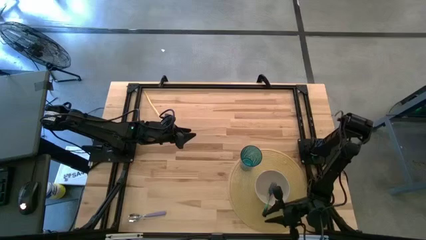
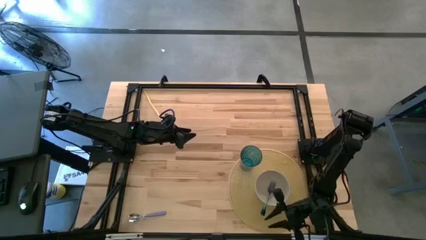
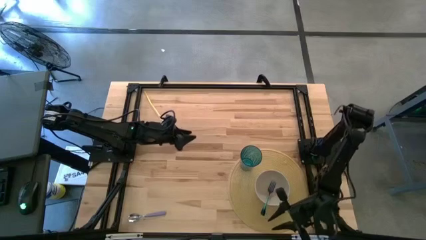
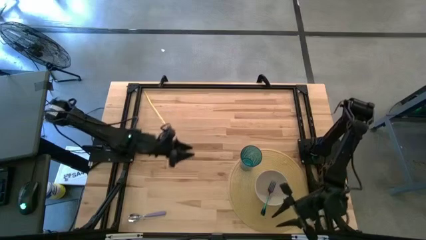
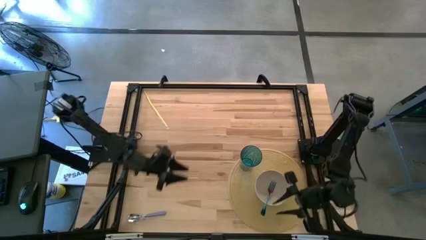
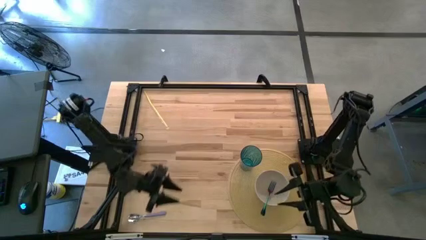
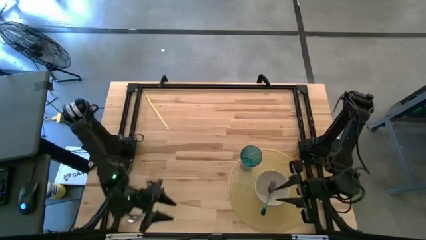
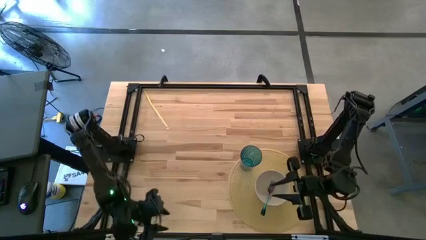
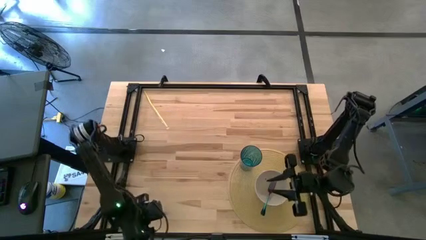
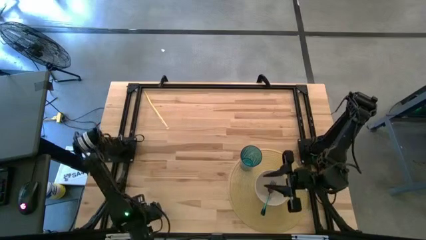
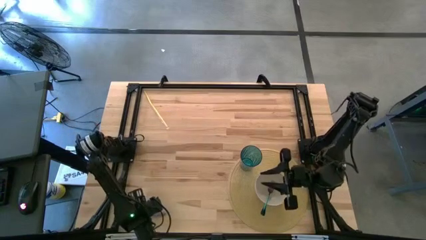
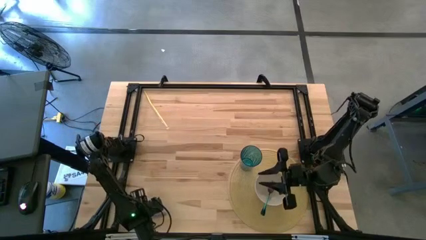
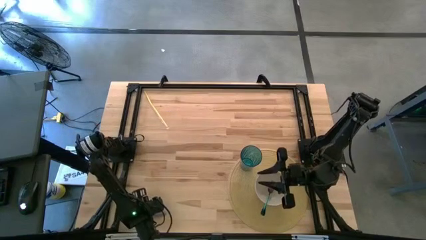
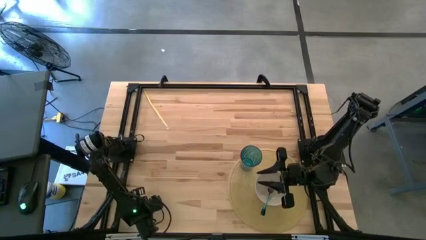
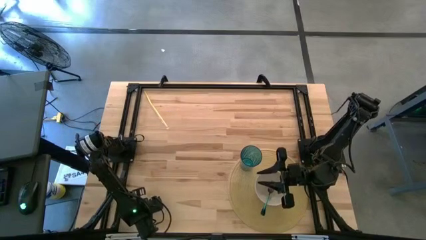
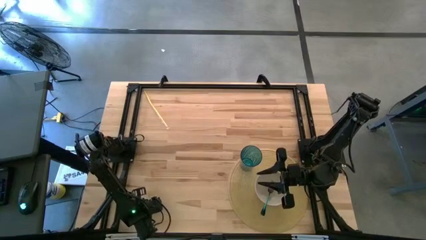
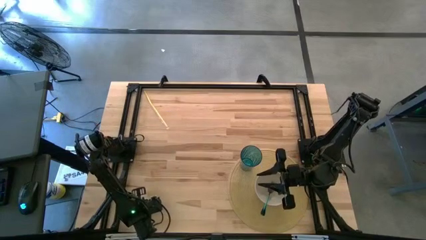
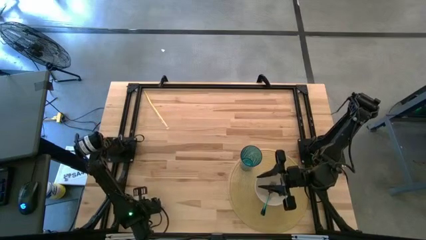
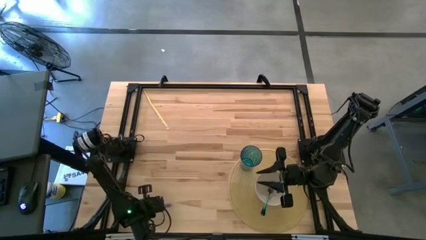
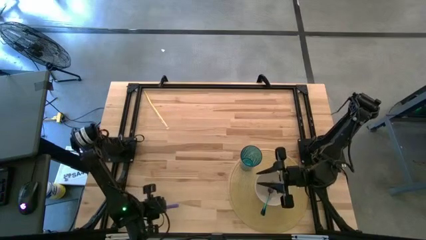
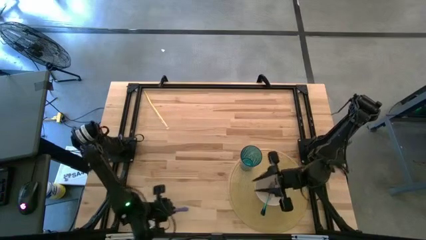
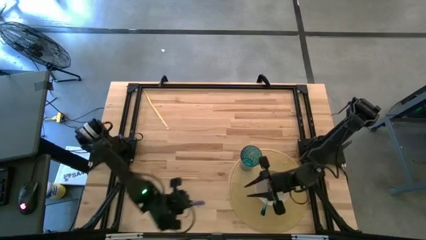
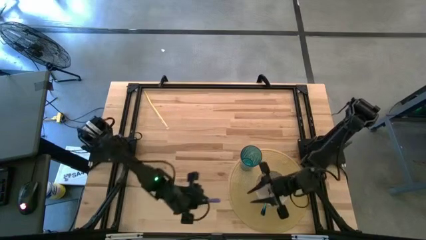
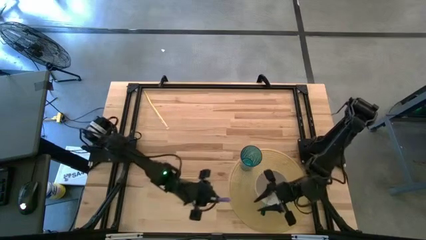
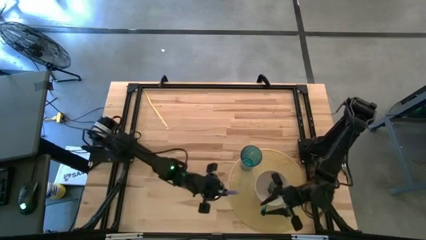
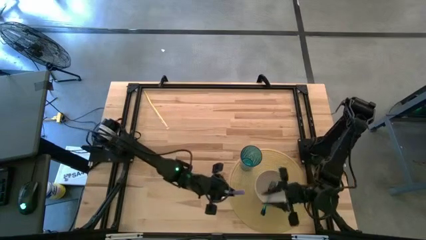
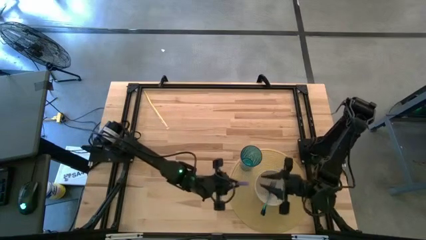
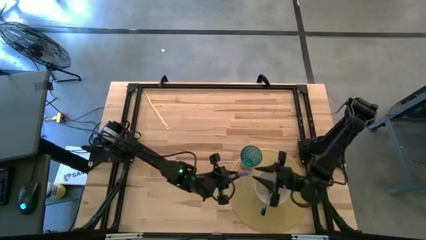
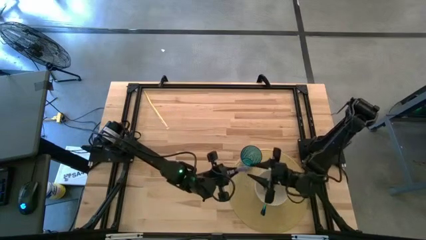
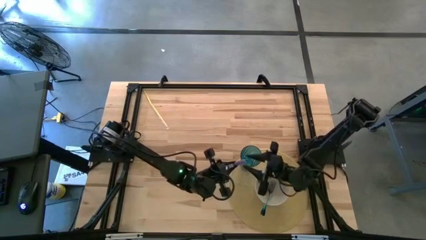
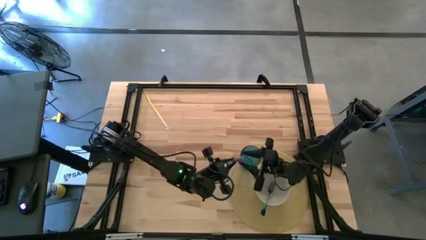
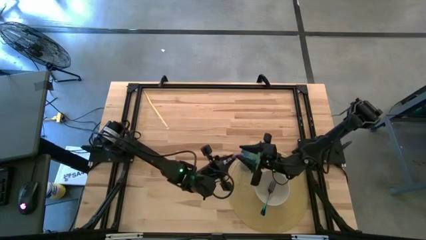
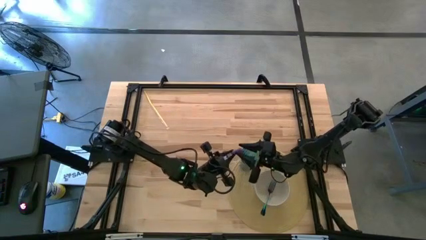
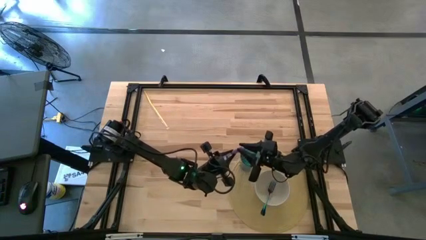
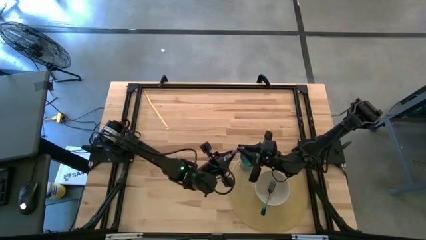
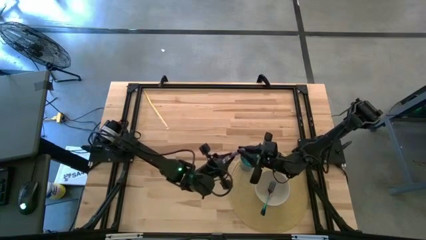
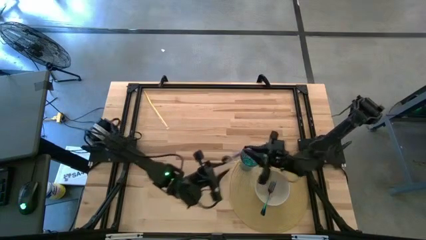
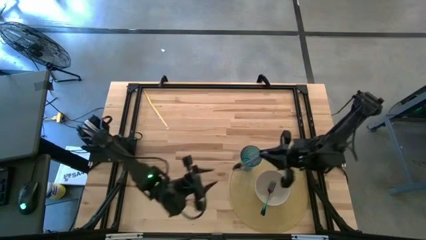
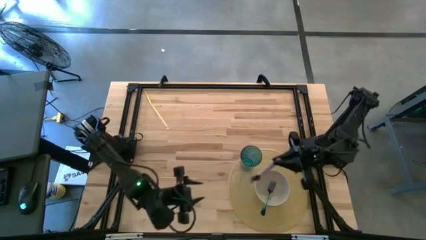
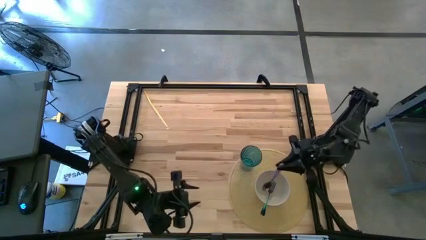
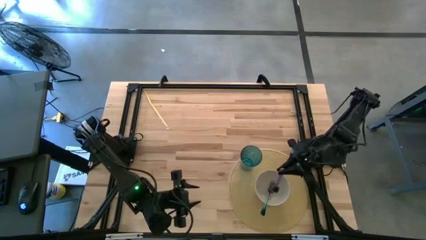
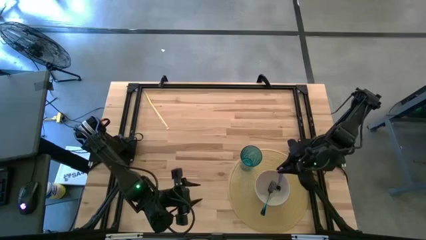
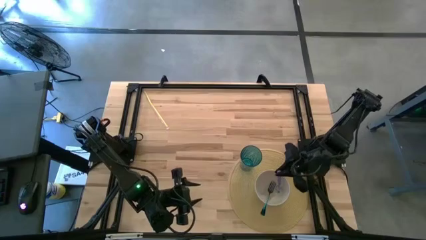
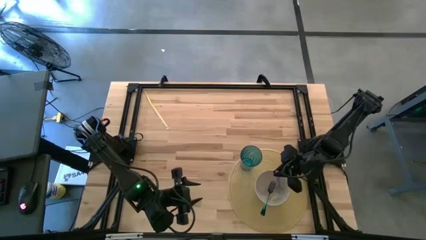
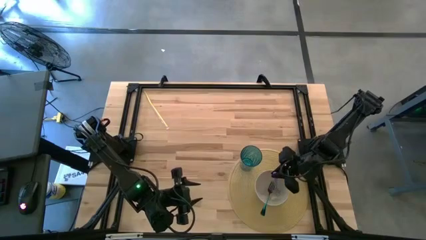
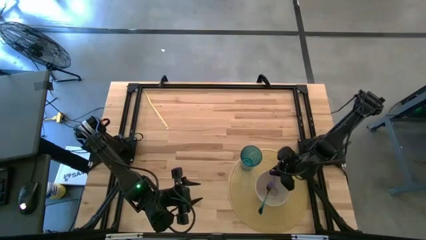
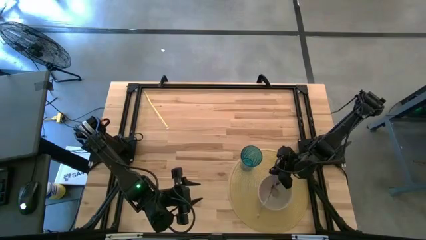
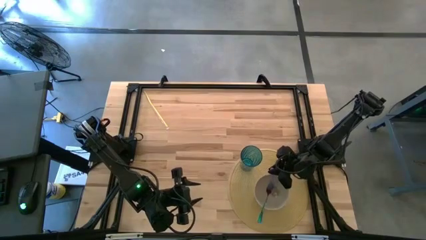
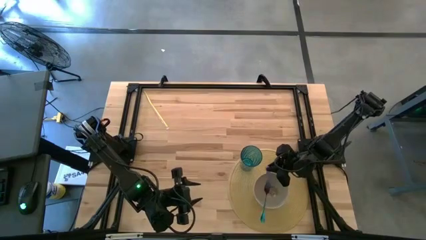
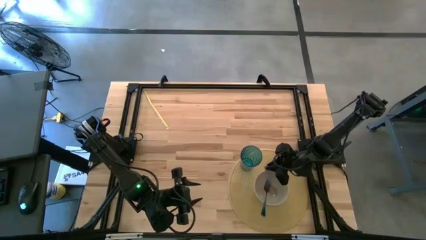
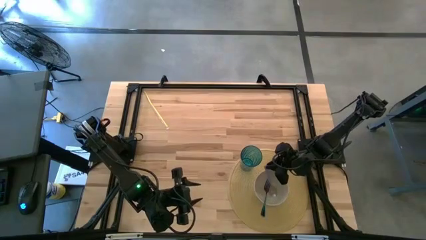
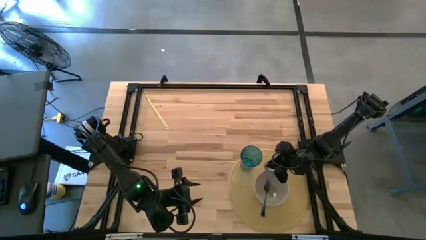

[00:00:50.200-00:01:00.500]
Task: Pick & Place Utensil
Put the purple spoon into the white bowl on the brown mat

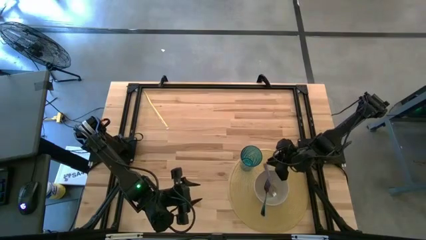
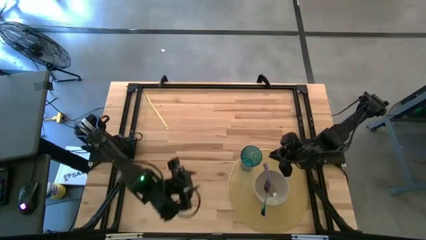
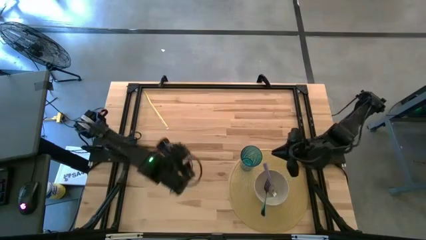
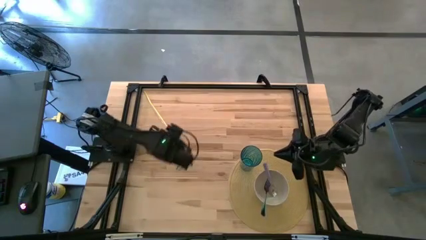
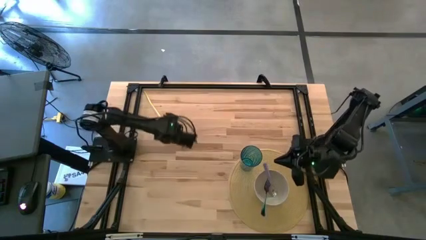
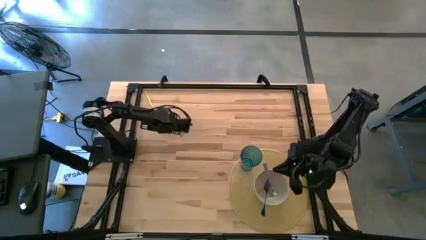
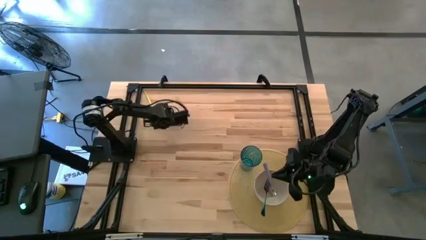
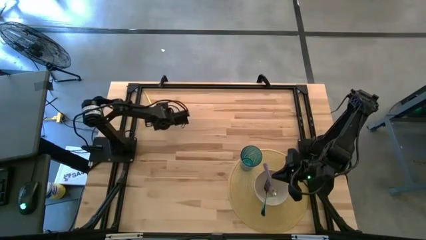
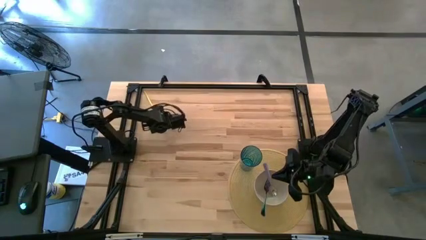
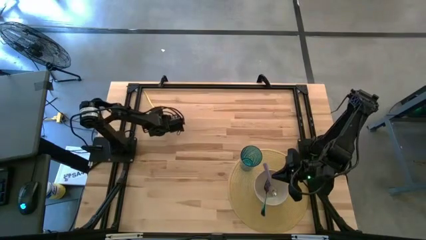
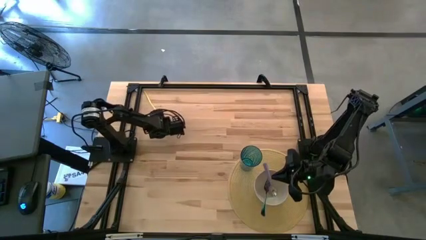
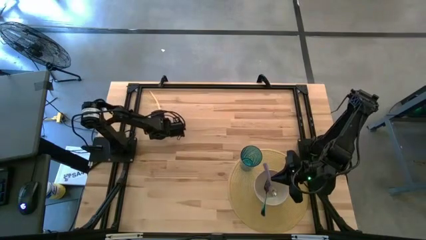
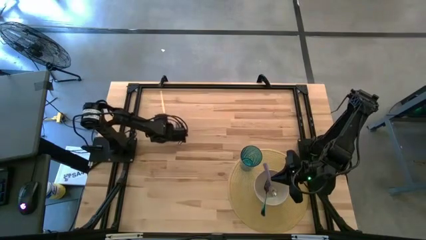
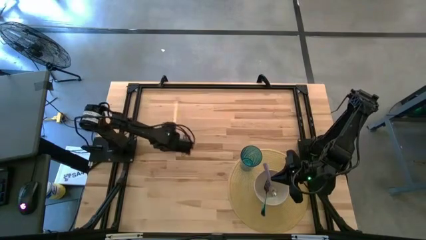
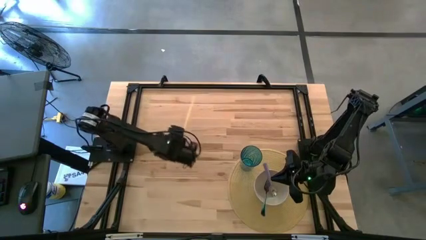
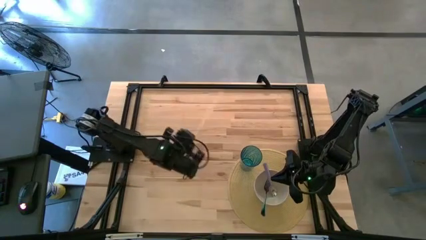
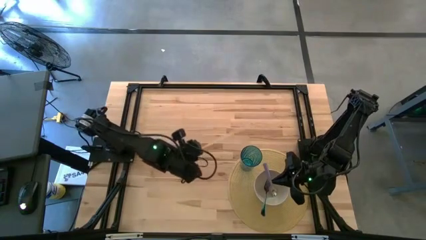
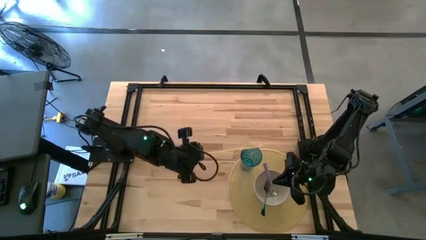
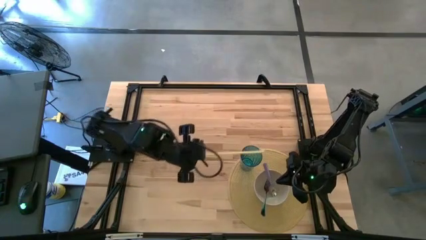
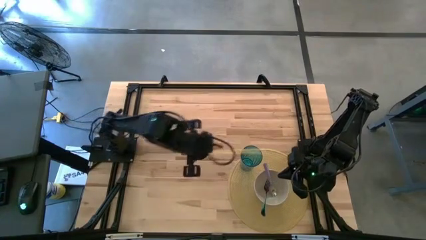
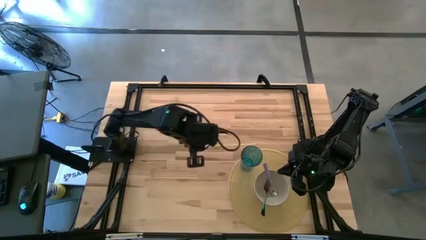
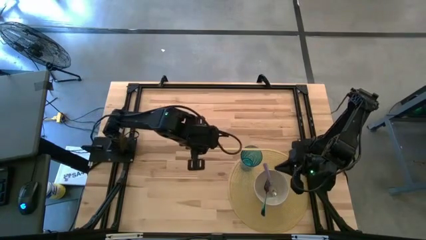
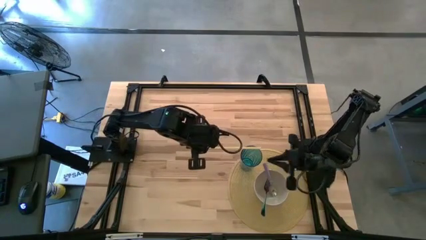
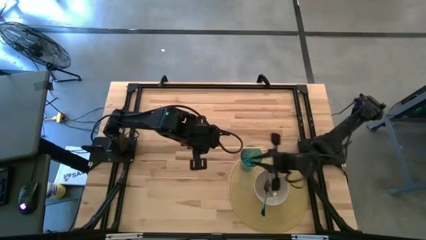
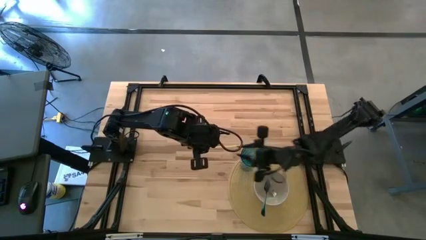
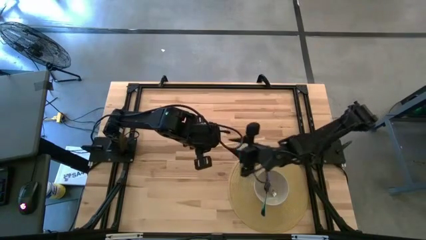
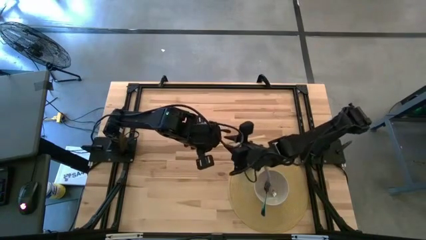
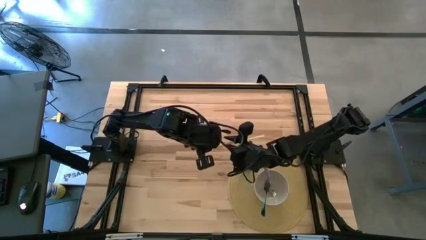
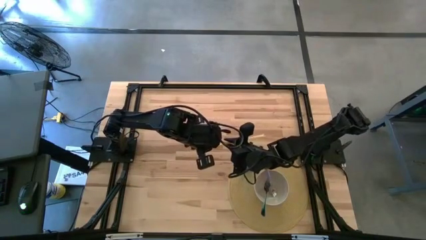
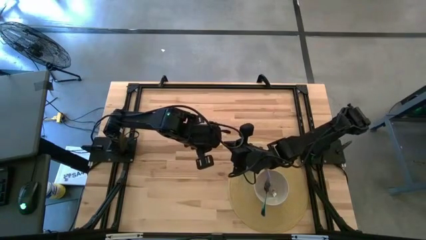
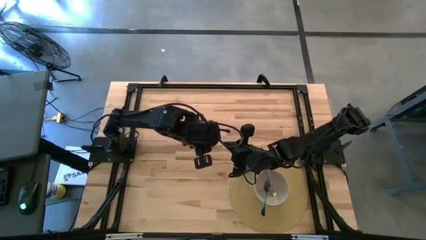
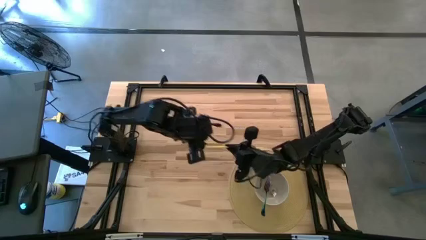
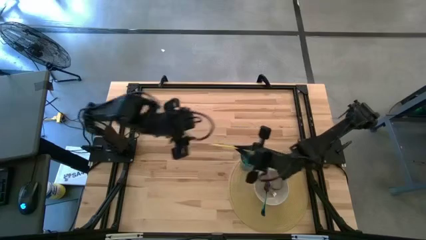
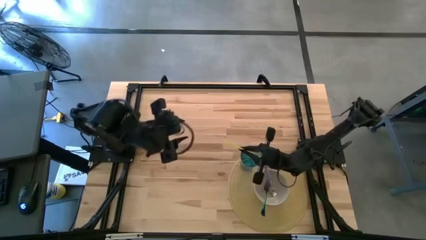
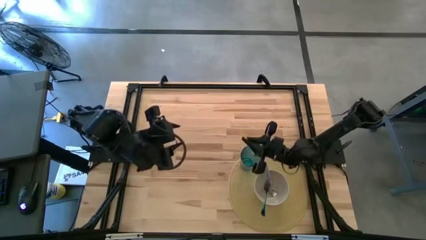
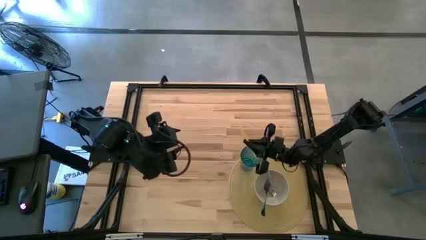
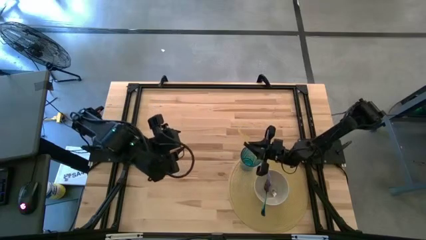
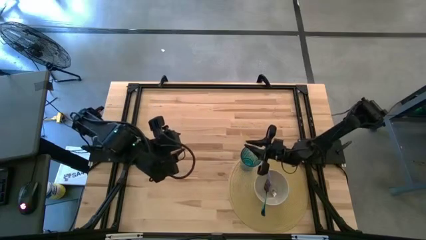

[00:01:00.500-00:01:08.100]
Put the yellow straw into the blue cup on the brown mat
